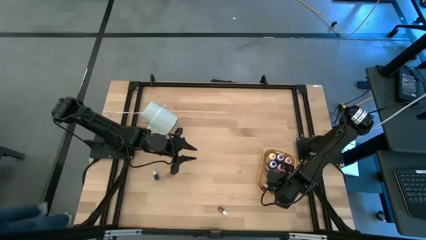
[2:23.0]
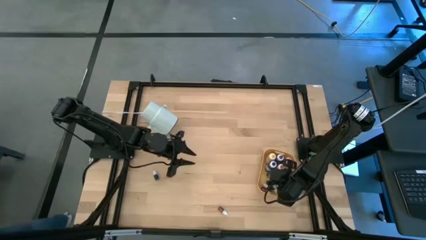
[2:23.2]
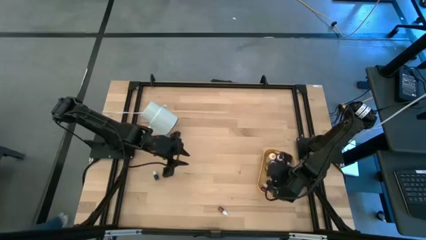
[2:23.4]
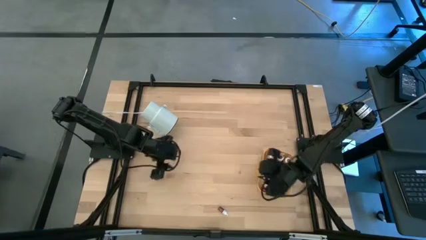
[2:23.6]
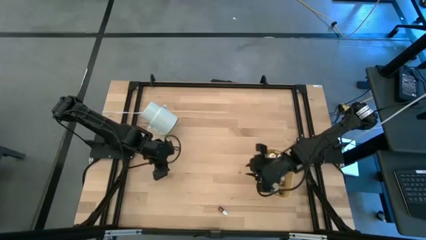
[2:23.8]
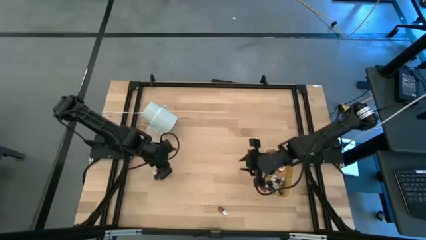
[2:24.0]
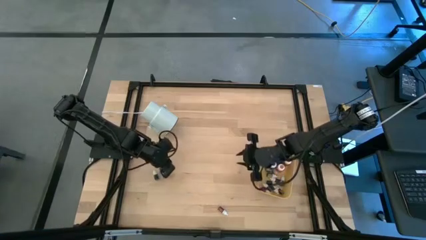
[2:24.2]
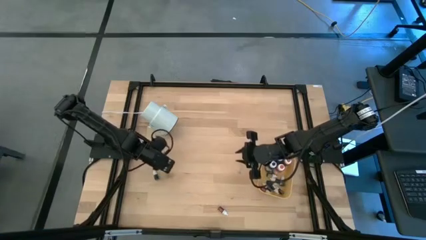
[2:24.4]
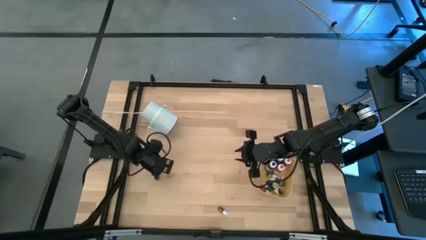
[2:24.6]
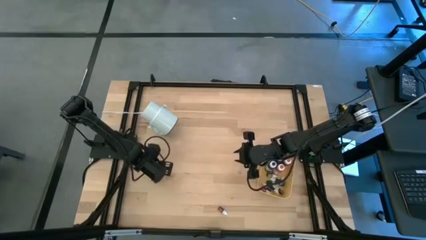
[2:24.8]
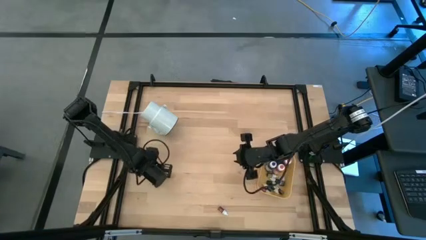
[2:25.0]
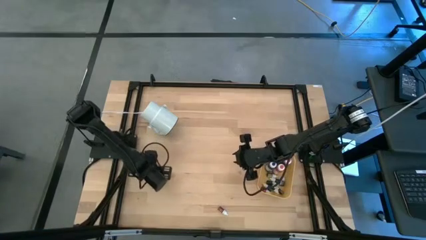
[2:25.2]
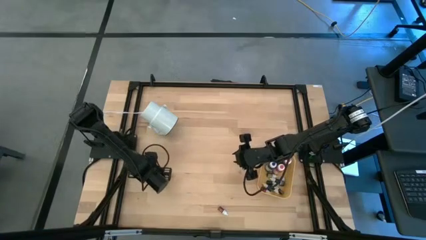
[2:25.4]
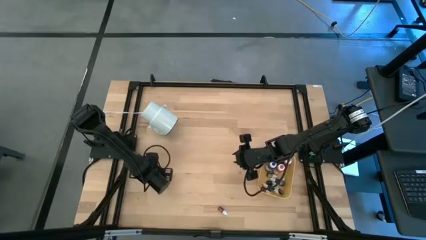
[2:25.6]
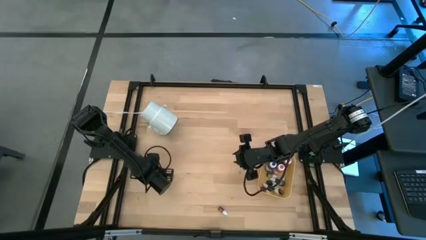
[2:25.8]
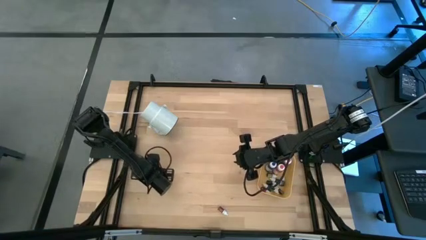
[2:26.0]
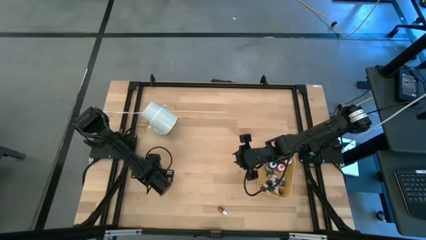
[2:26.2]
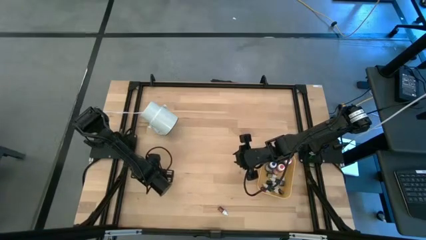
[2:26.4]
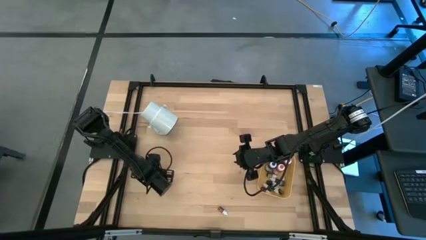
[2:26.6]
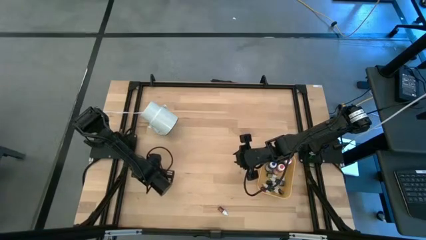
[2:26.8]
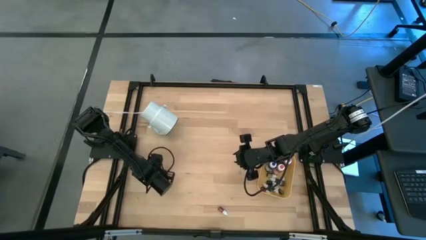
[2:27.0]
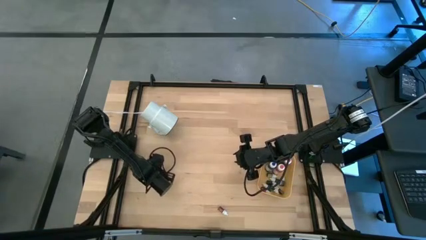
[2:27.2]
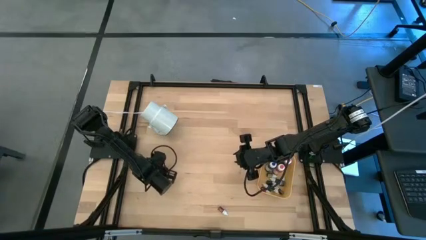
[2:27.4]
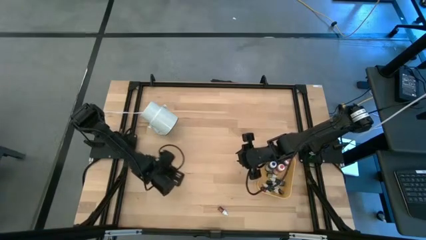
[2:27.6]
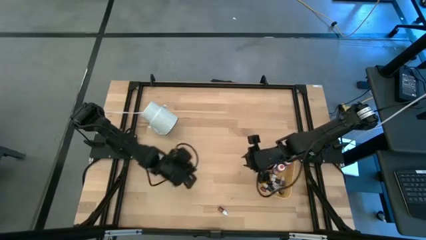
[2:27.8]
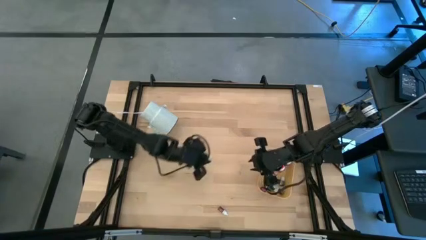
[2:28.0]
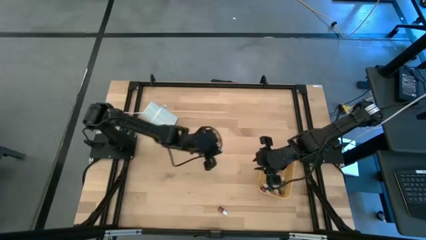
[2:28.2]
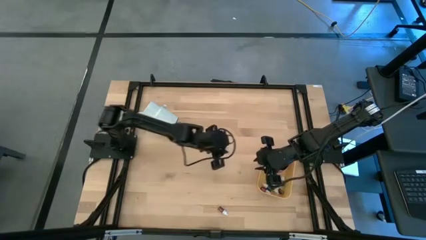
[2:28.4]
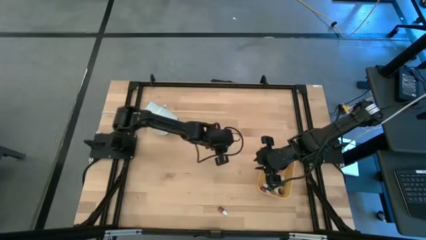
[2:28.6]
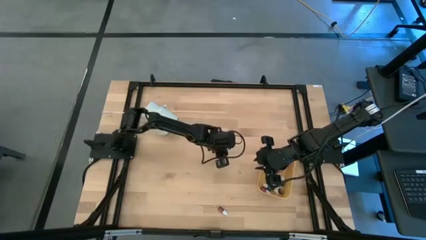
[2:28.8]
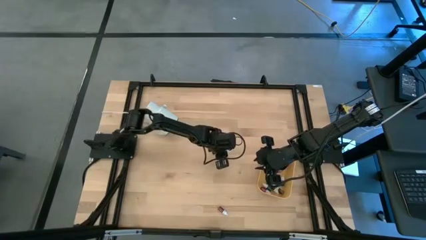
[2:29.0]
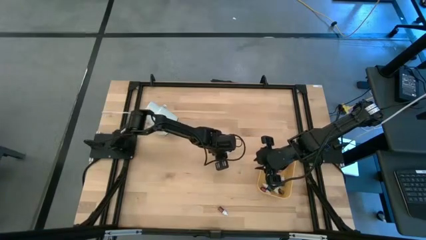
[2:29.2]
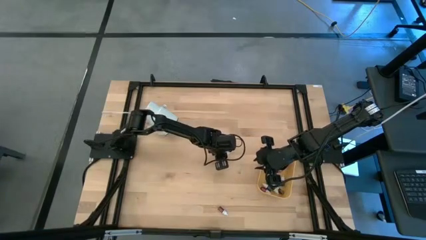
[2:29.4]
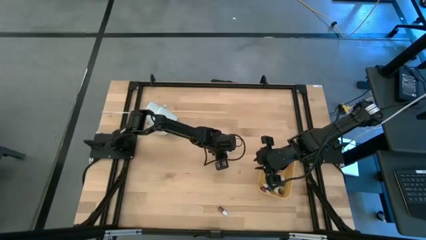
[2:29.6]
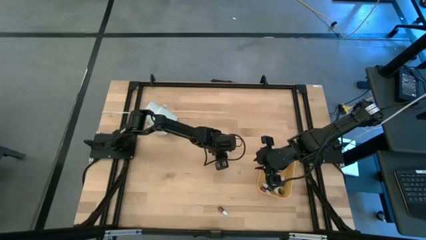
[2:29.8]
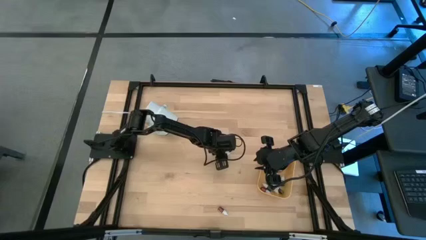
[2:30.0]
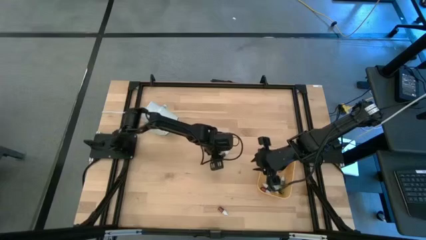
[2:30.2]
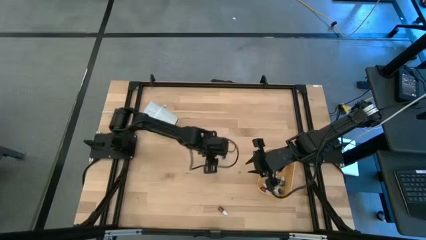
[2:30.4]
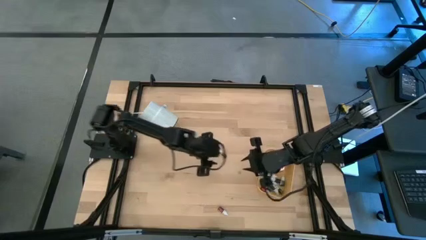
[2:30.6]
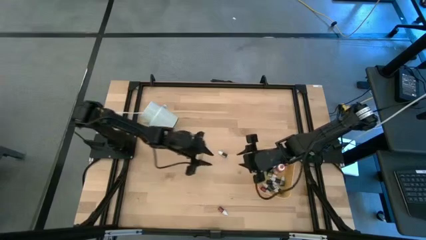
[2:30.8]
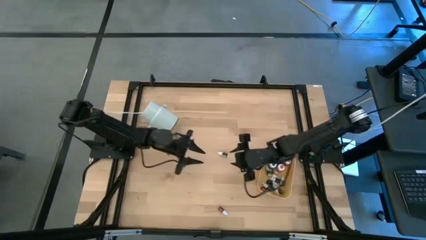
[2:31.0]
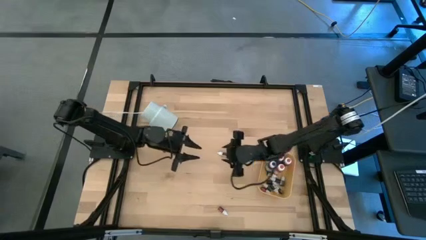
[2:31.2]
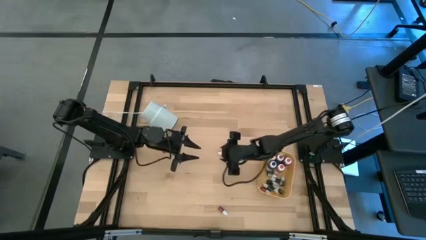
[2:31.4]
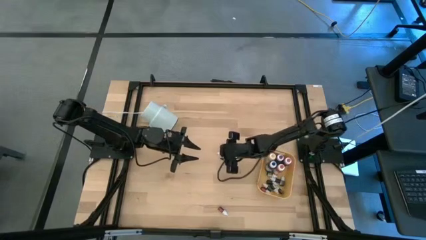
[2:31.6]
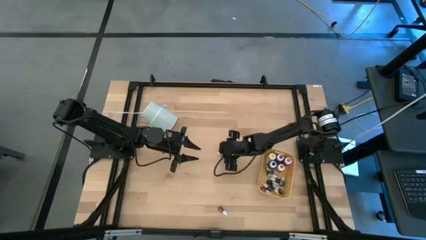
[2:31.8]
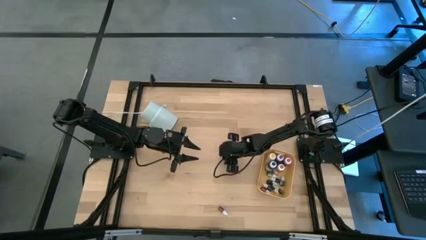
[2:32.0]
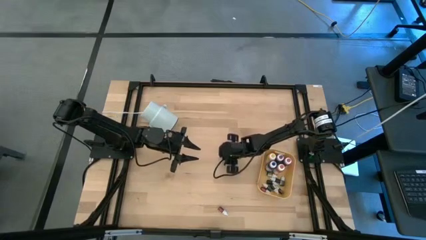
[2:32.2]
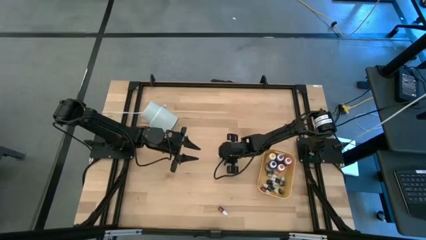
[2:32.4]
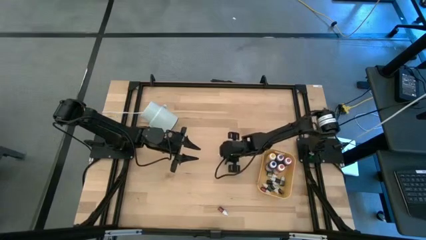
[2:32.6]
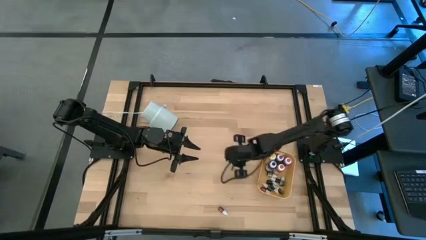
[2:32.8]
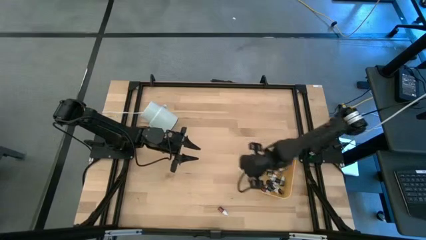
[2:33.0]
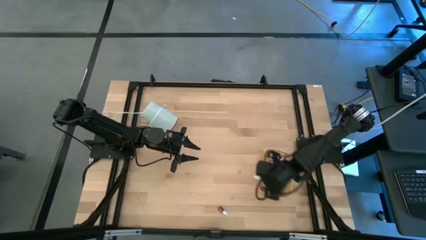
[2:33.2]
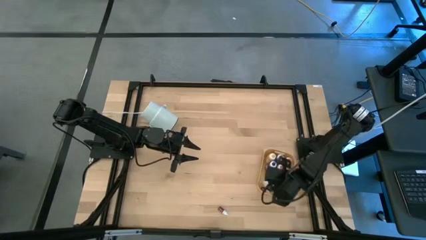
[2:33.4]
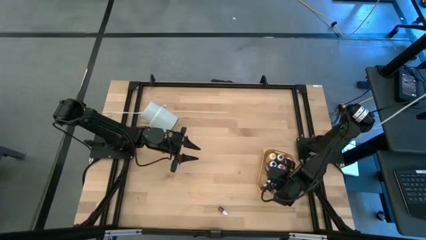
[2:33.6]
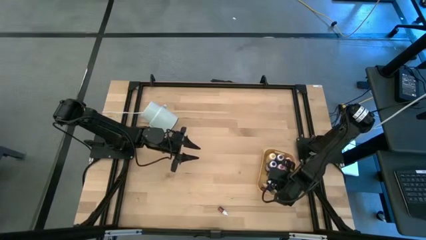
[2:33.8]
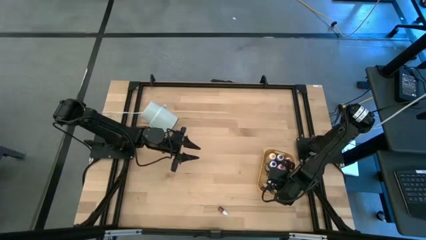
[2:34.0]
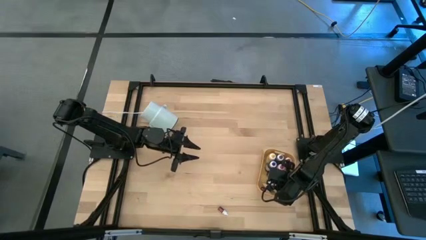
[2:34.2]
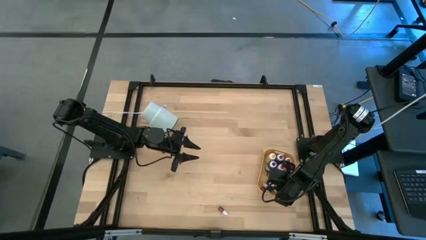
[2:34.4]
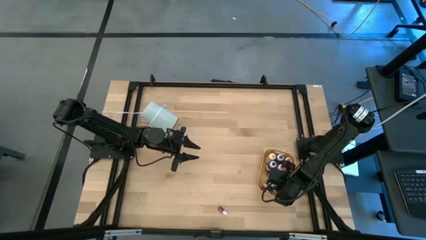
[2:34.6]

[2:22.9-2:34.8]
Task: Pick & Place food coloring
Put the small black food coloring bottle into the yellow bin

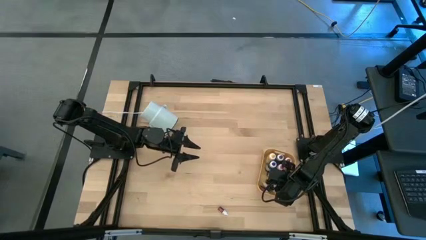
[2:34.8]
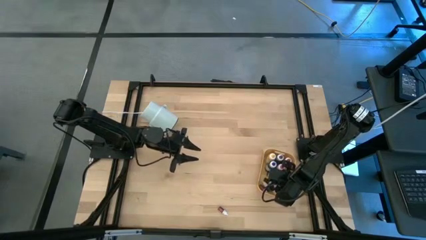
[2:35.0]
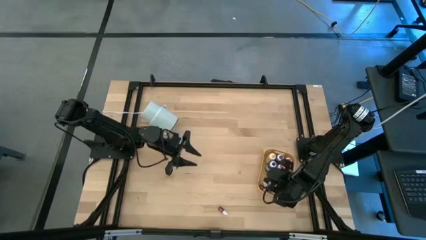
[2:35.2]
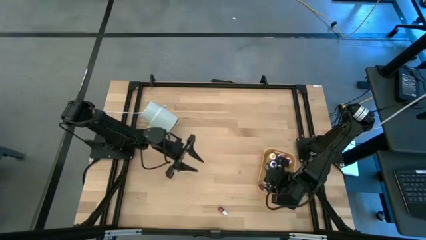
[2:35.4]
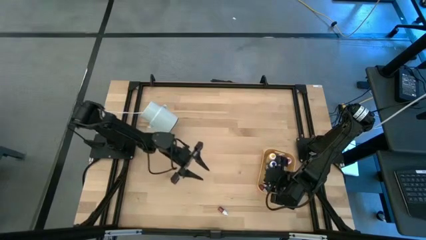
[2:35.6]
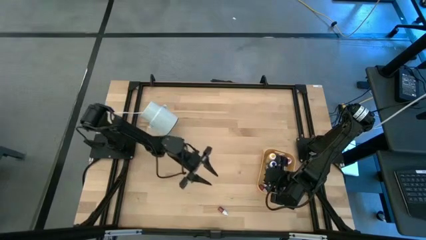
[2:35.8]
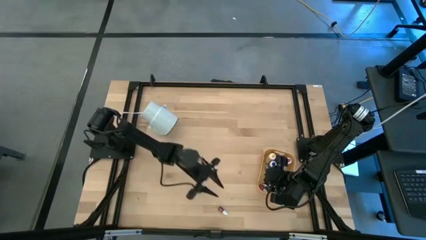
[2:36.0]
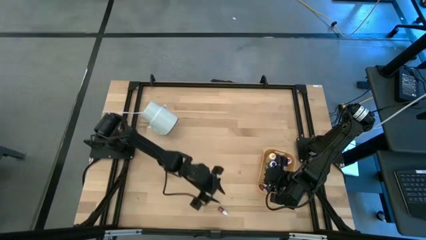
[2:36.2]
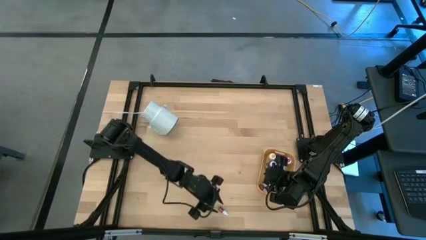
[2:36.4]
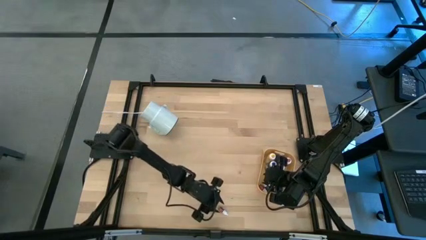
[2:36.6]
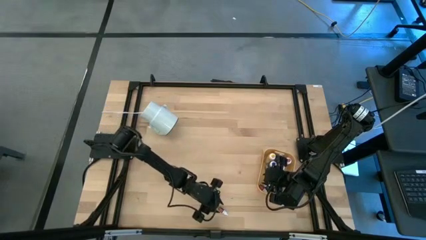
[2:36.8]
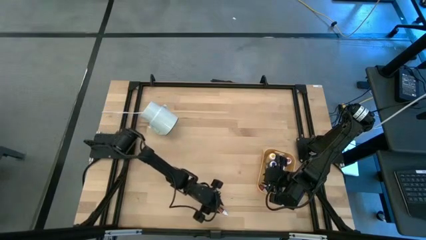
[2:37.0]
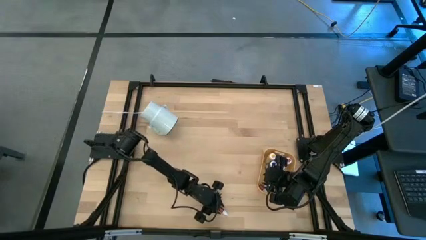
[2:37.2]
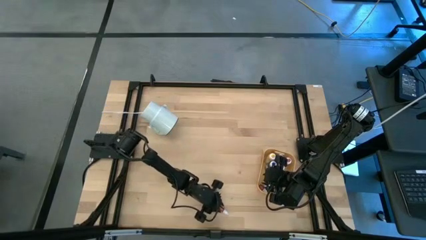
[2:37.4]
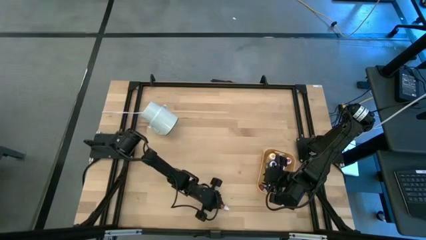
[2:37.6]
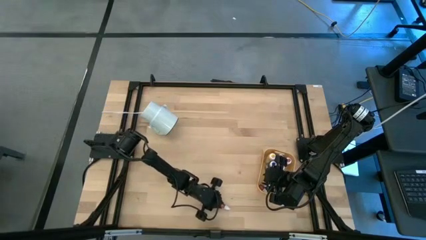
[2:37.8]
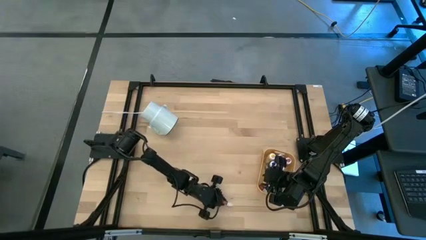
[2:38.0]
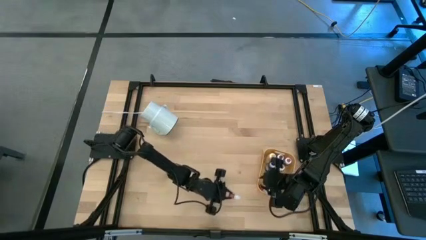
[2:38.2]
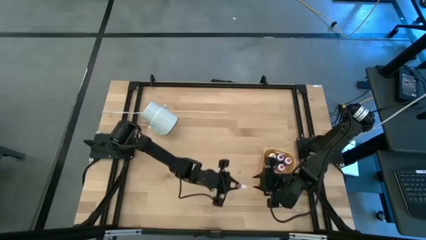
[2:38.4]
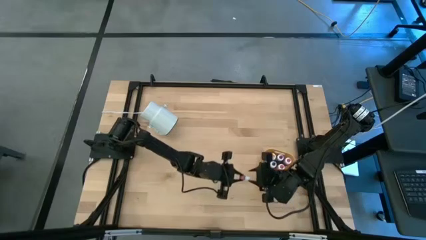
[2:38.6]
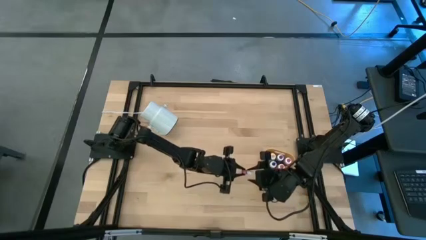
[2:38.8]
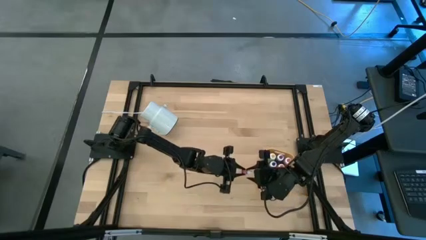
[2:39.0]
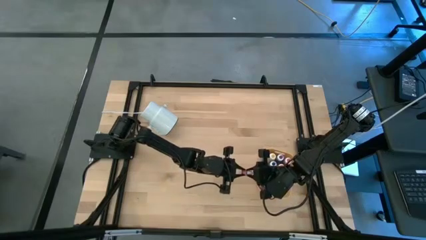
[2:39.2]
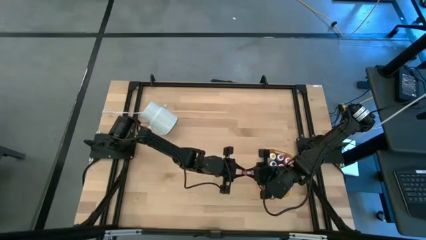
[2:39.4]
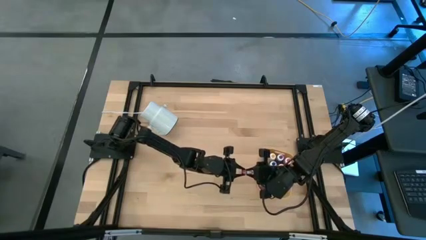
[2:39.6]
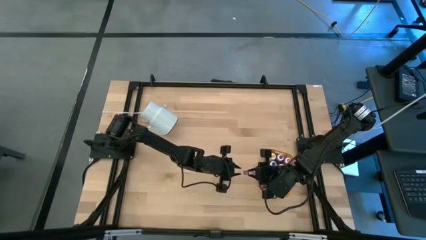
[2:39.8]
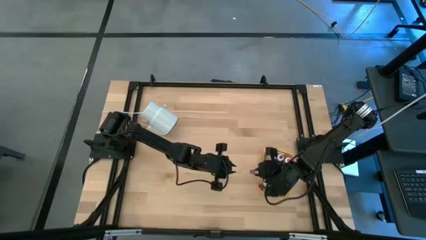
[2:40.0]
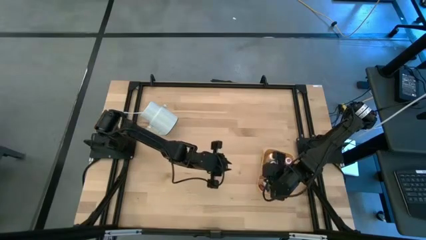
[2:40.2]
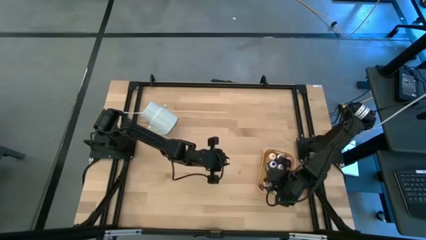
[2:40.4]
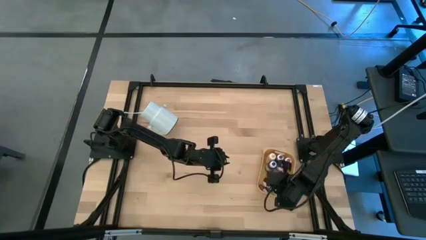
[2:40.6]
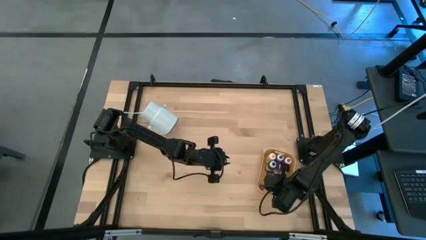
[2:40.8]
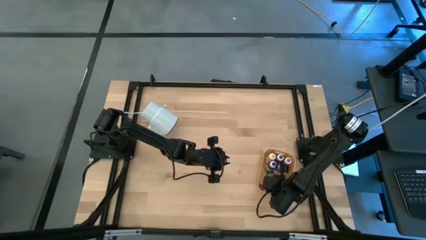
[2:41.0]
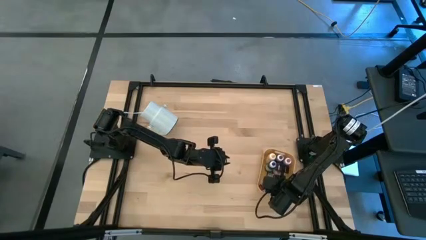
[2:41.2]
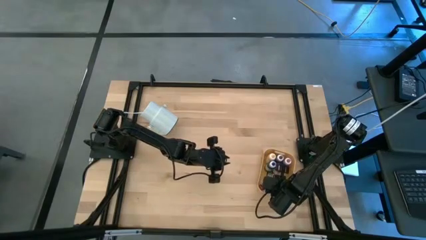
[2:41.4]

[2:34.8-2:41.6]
Put the small dark red food coloring bottle into the yellow bin
